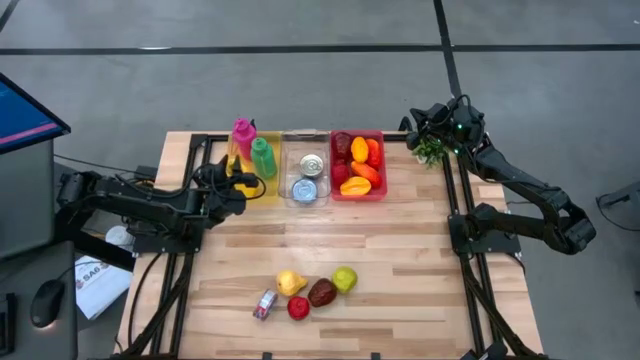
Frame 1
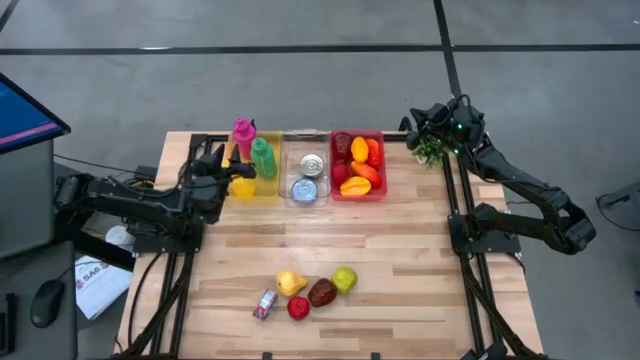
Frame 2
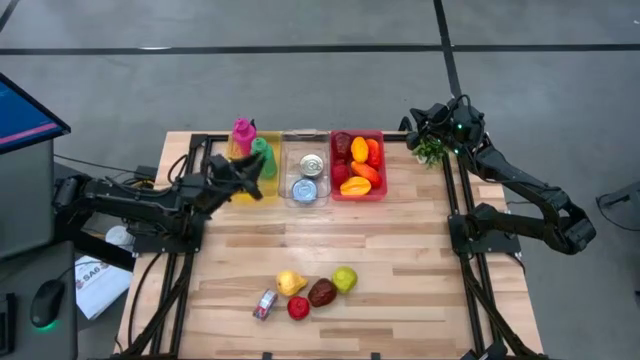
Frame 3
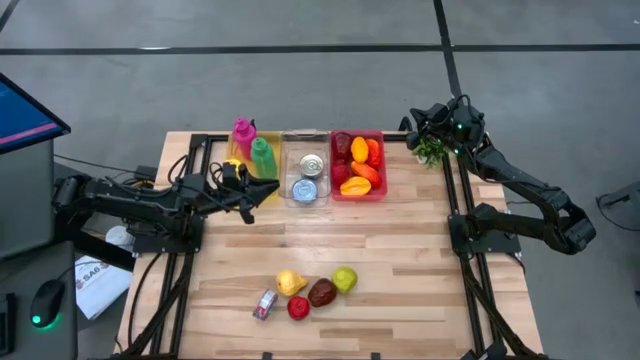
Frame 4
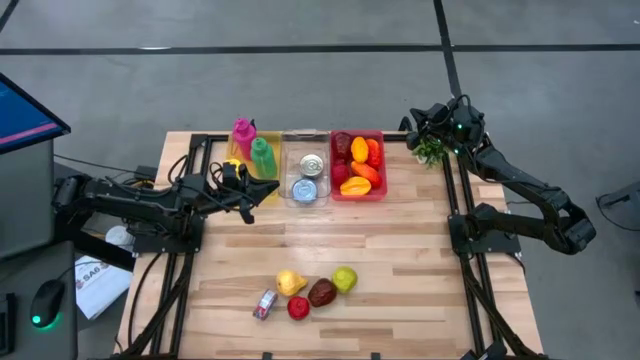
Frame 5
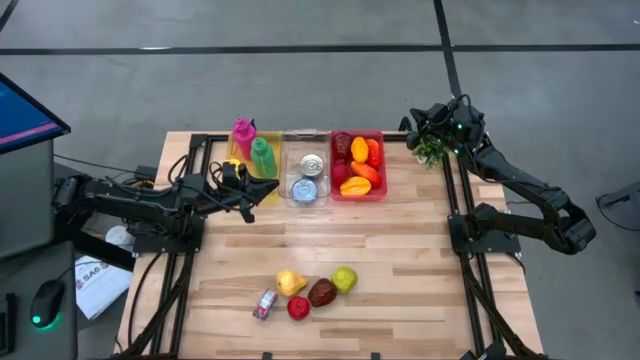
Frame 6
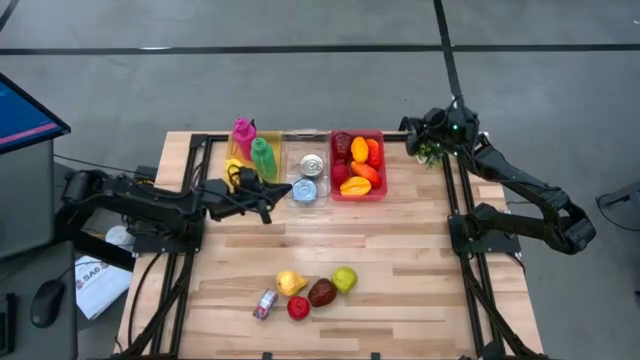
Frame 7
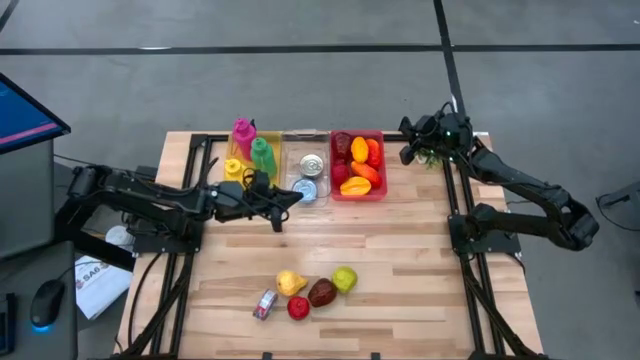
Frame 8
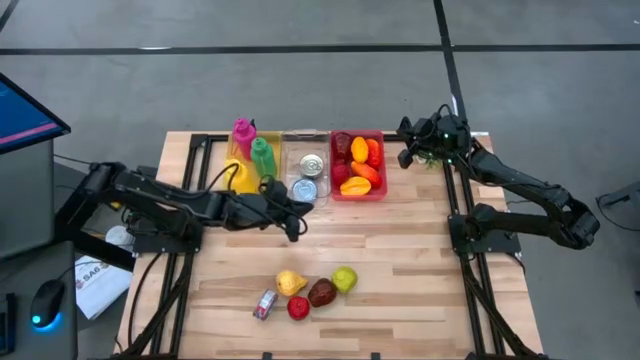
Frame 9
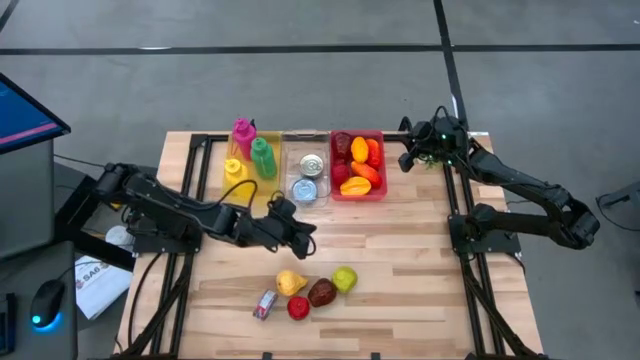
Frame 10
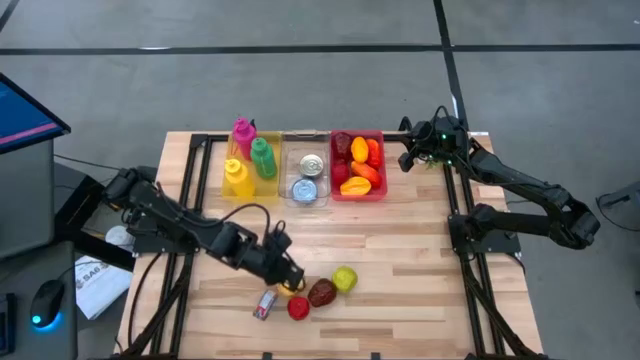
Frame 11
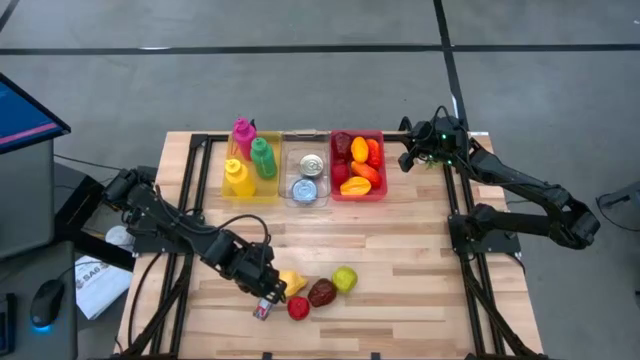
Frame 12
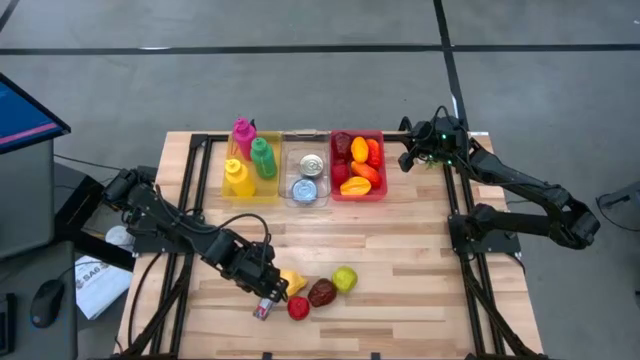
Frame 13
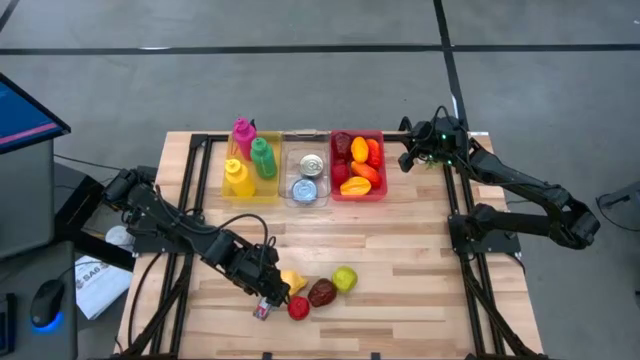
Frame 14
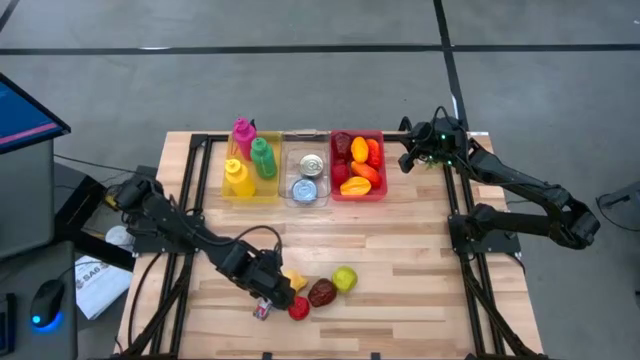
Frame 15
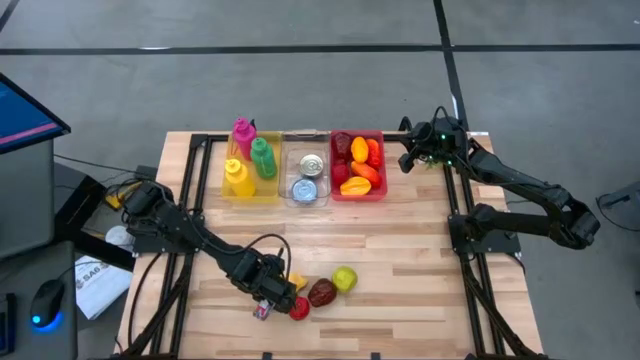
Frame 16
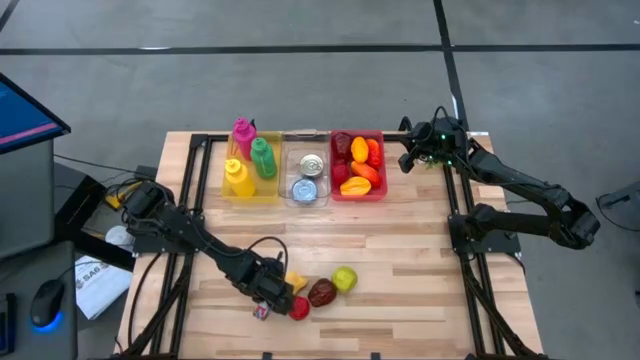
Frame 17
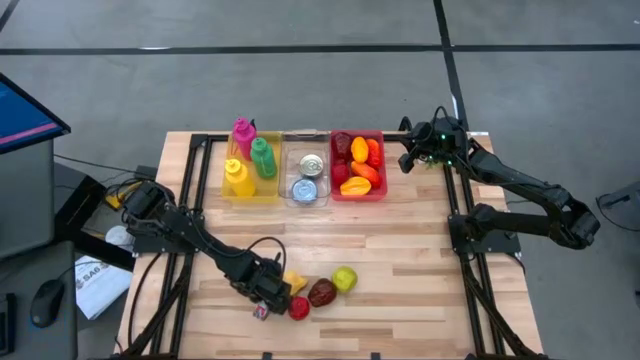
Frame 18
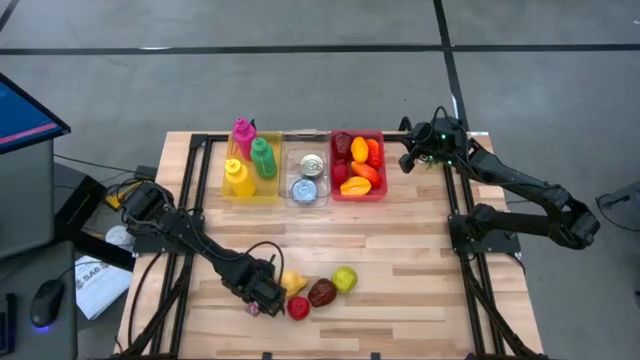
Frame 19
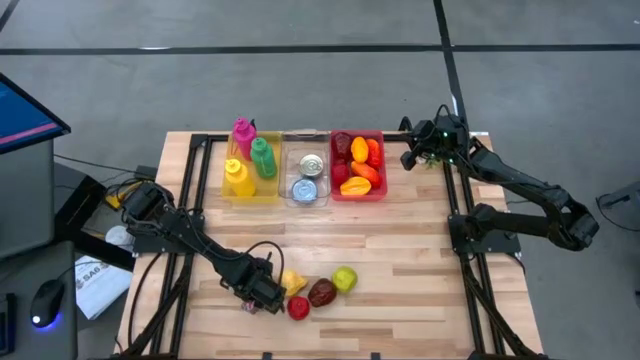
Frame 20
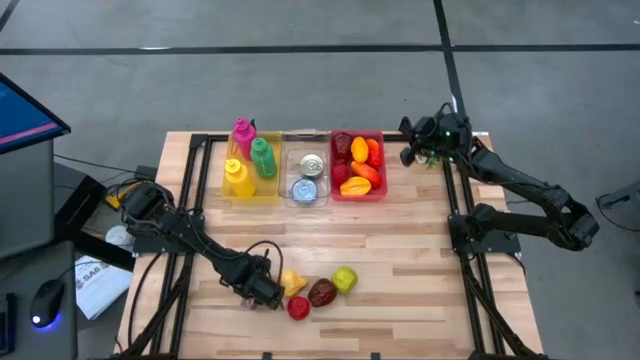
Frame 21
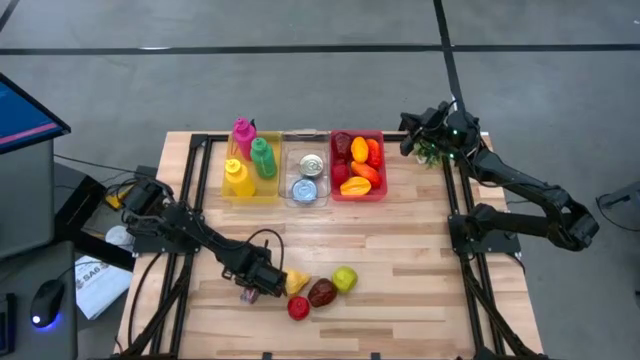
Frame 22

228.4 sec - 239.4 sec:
Task: Pick & Place Food Item
Put the red tuna can into the transparent bin

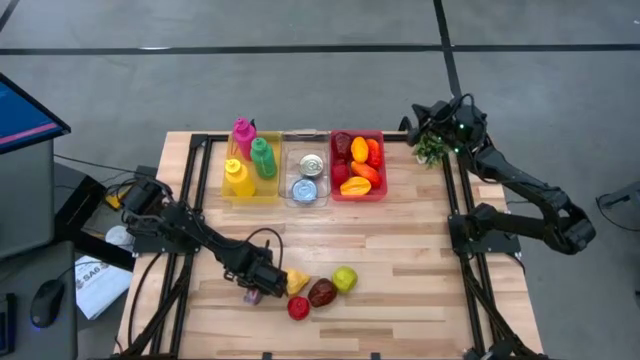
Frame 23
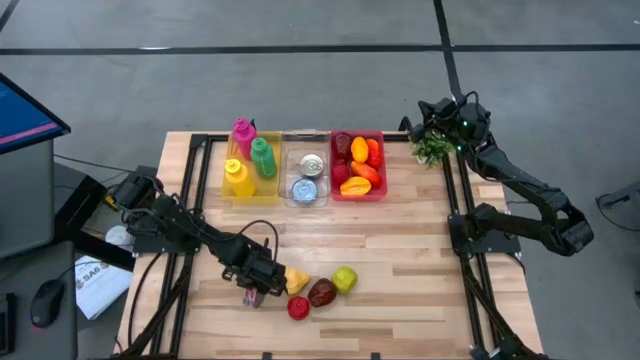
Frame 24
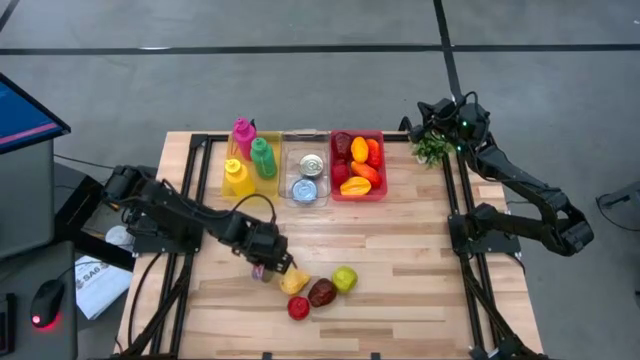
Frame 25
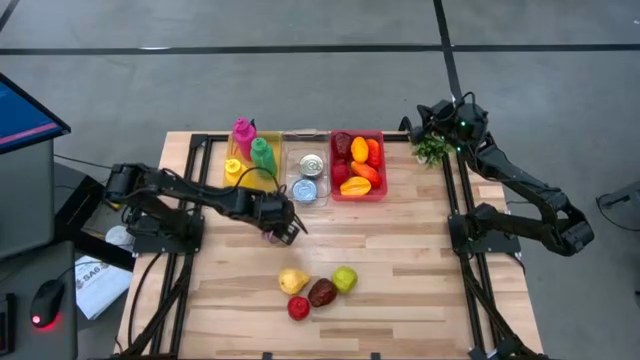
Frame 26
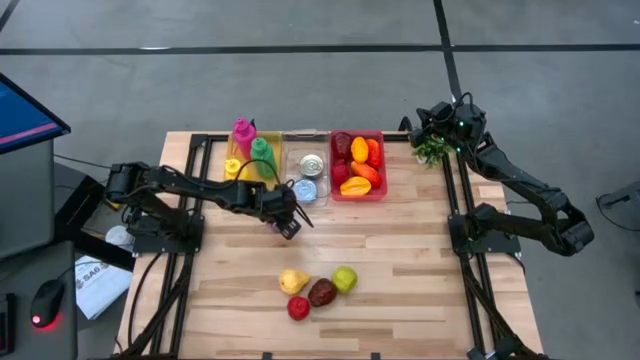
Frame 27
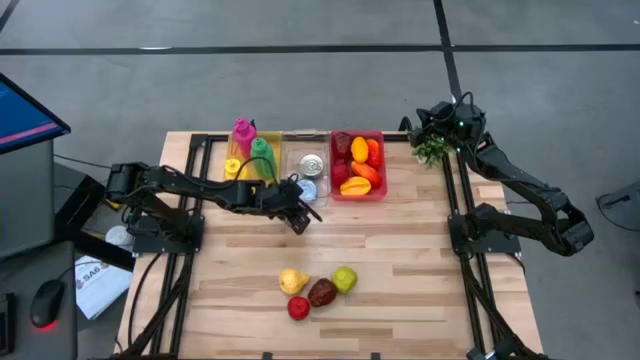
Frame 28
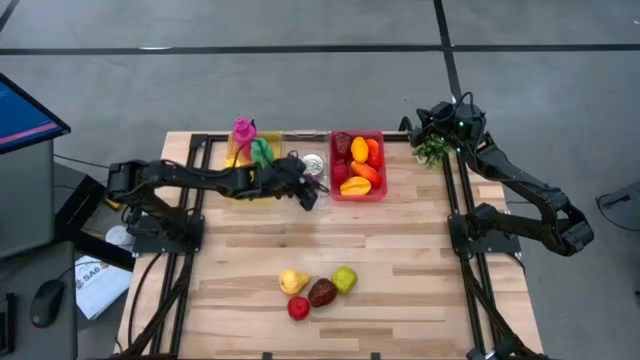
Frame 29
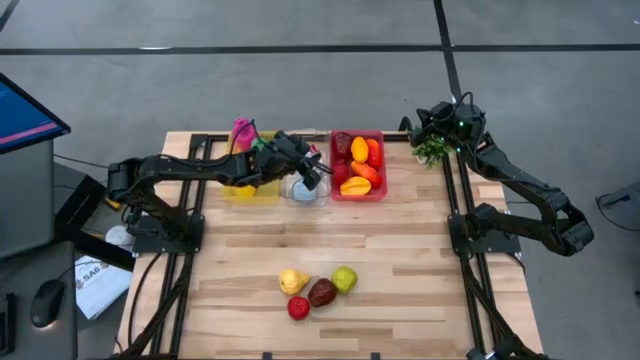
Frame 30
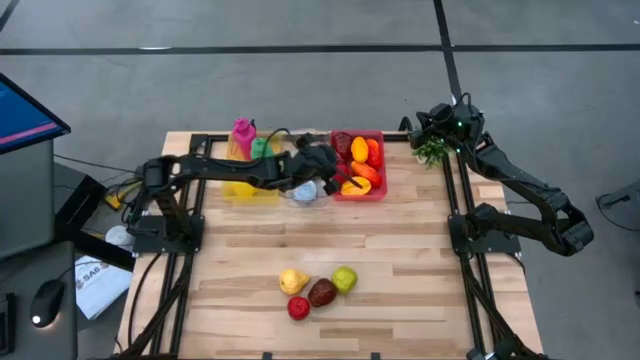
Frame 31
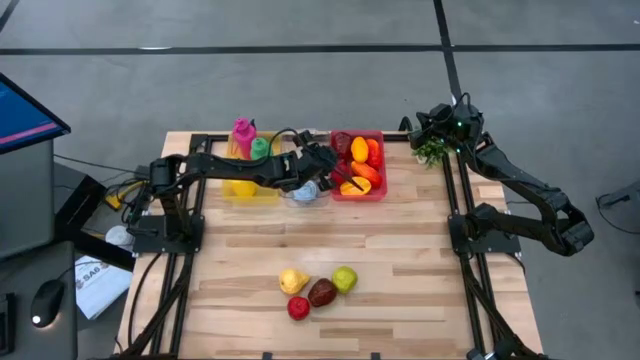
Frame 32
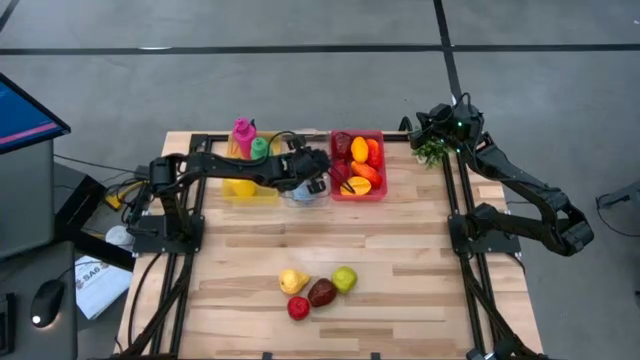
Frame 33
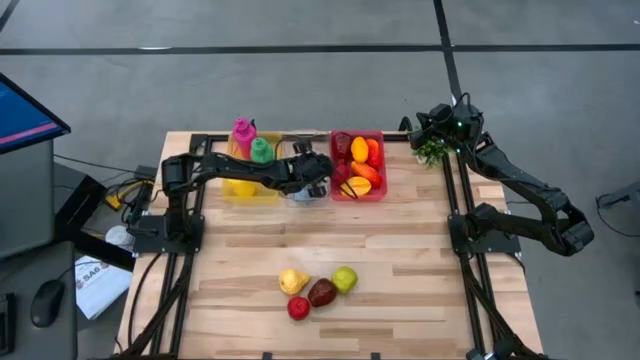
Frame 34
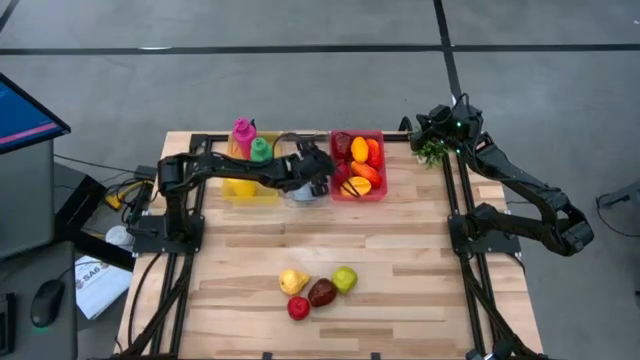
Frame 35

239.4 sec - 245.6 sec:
Put the red tuna can into the transparent bin

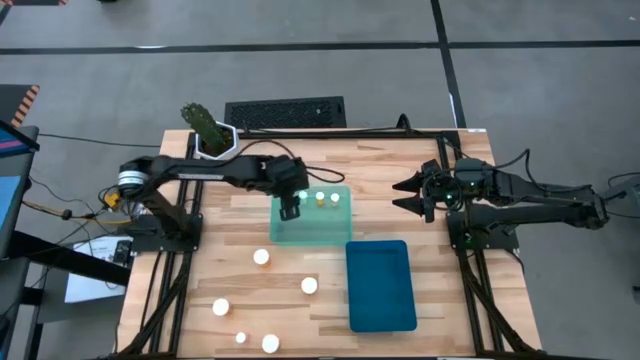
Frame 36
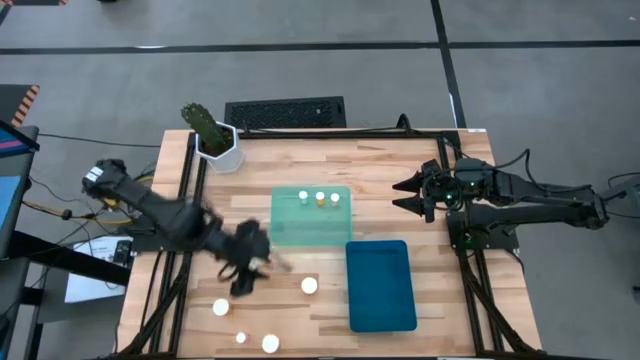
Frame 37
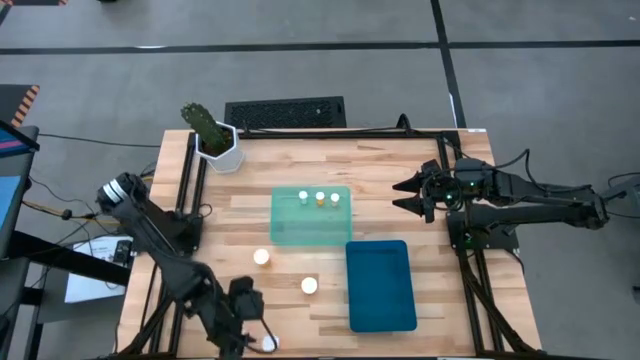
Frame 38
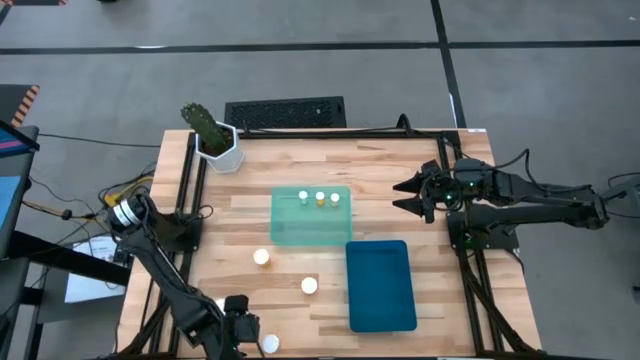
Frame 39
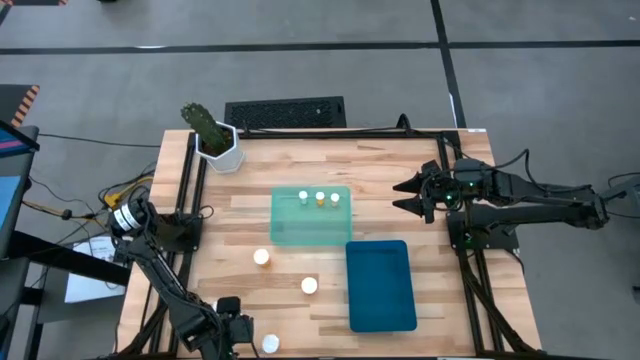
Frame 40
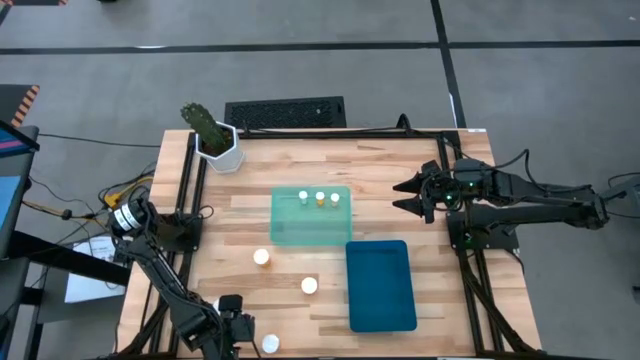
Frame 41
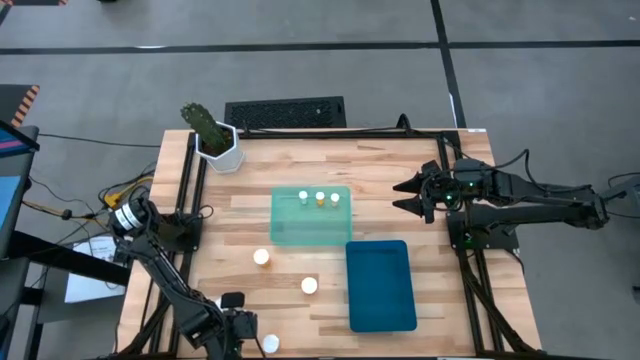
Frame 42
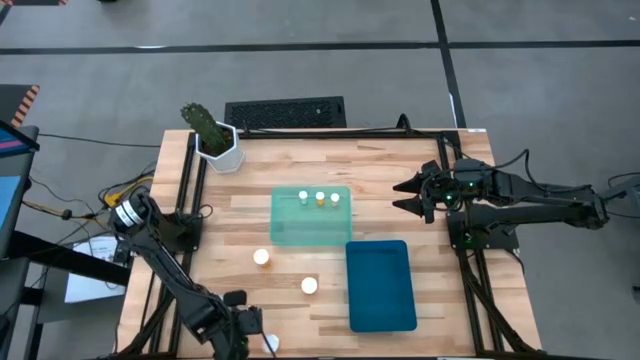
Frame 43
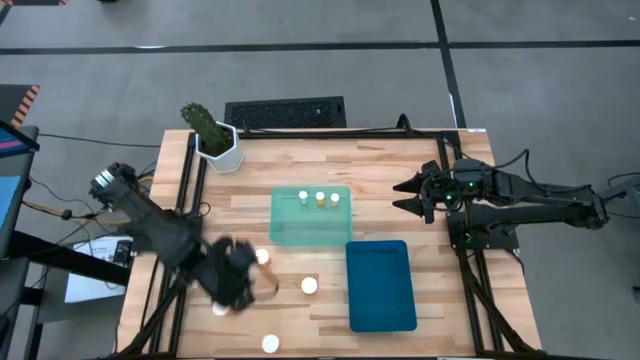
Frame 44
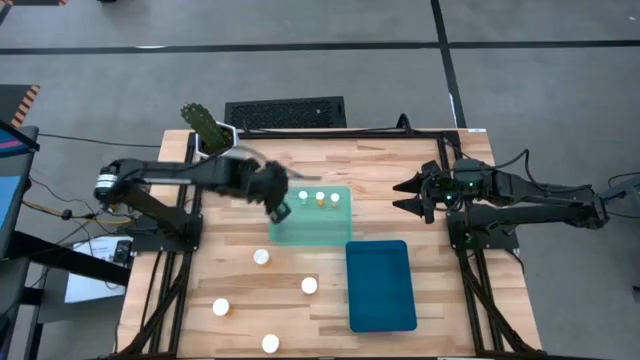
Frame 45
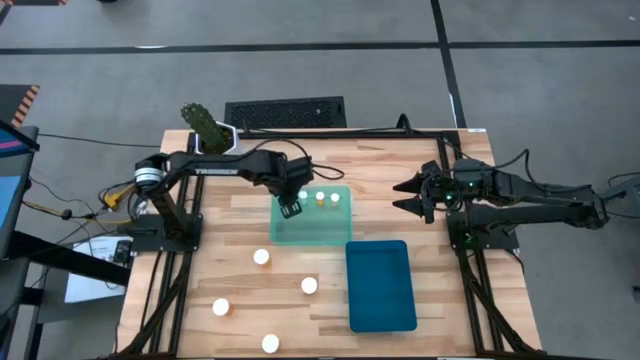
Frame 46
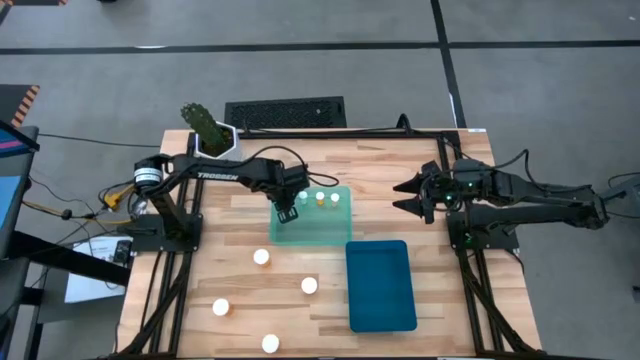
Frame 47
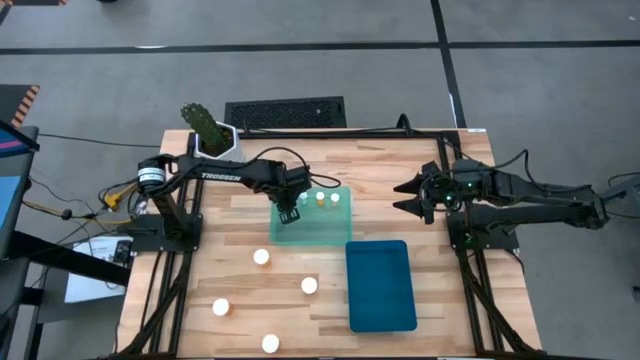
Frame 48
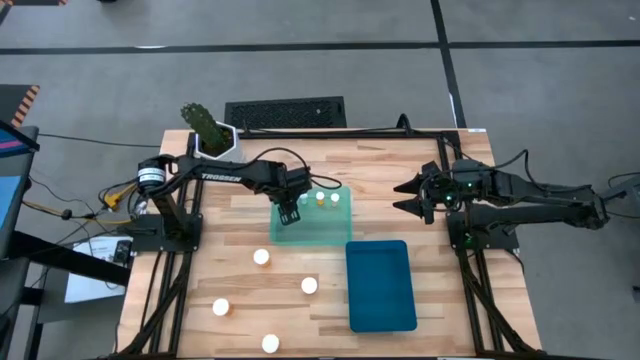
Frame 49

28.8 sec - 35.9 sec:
Task: Pick and place medicine bottles into bin by pill shape (circle, oval)
Put the pink pill bottle into the light blue bin
